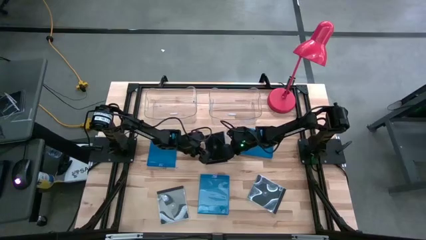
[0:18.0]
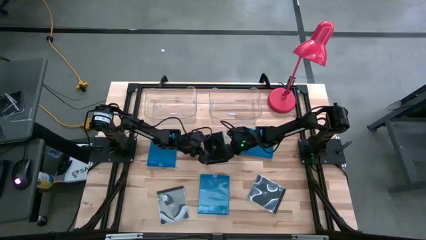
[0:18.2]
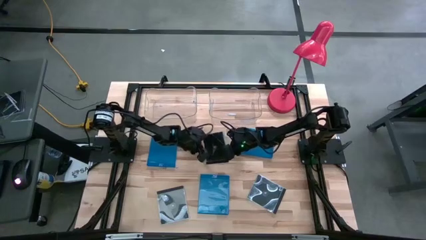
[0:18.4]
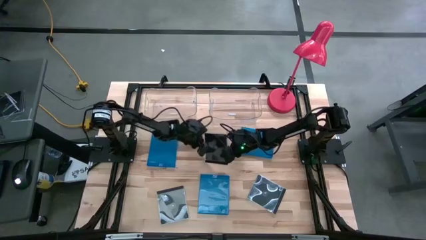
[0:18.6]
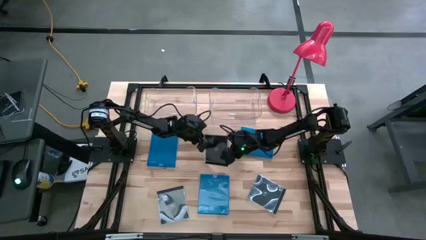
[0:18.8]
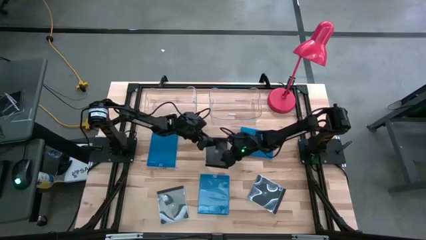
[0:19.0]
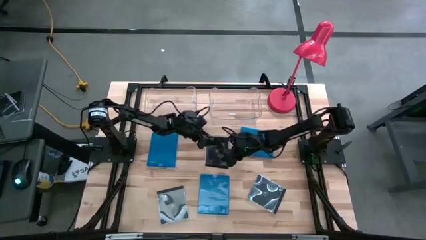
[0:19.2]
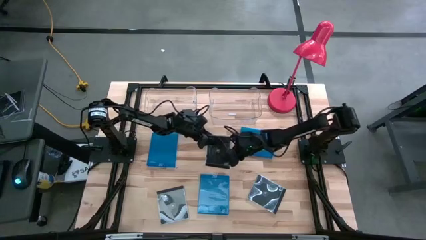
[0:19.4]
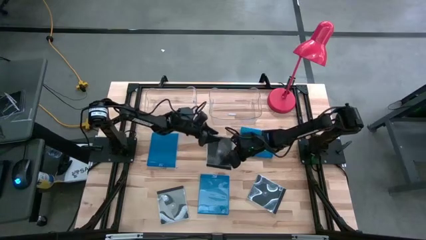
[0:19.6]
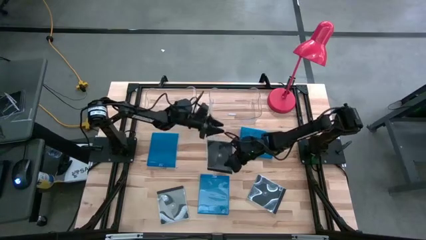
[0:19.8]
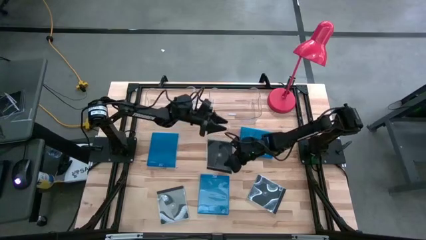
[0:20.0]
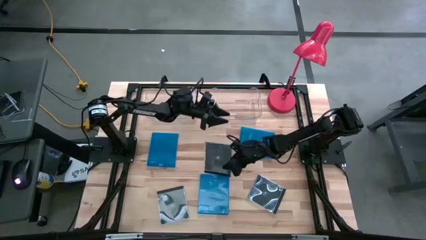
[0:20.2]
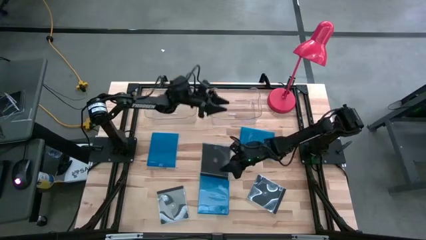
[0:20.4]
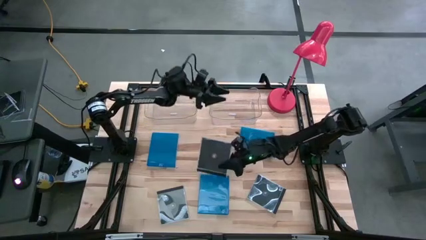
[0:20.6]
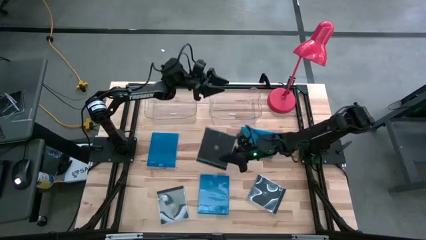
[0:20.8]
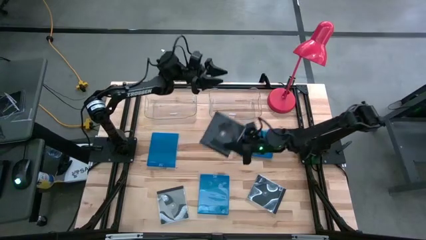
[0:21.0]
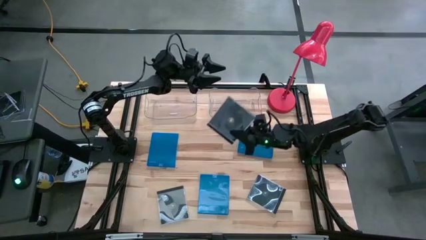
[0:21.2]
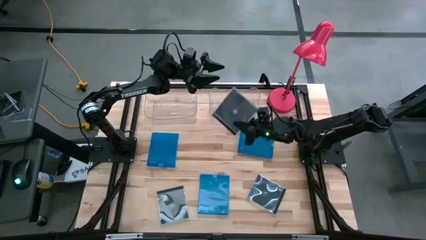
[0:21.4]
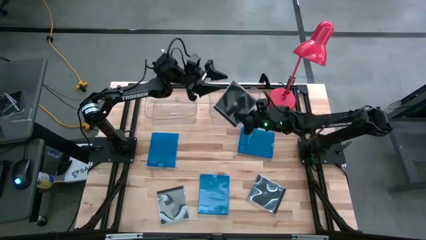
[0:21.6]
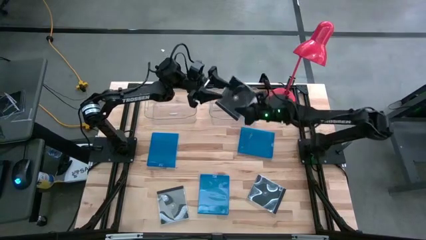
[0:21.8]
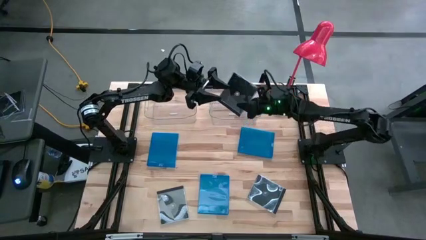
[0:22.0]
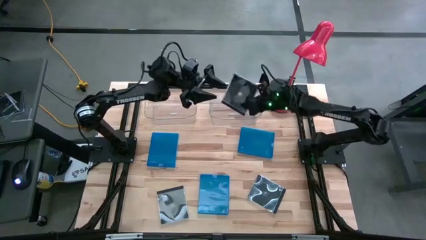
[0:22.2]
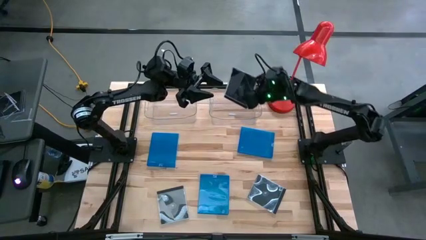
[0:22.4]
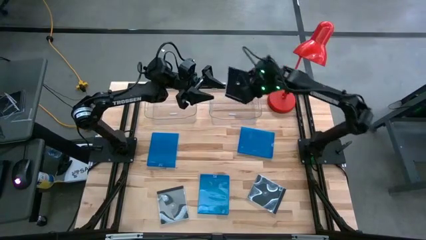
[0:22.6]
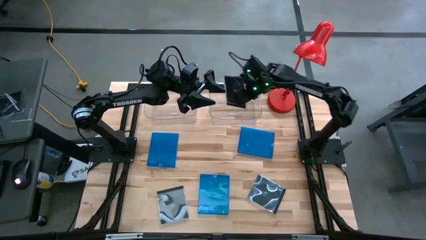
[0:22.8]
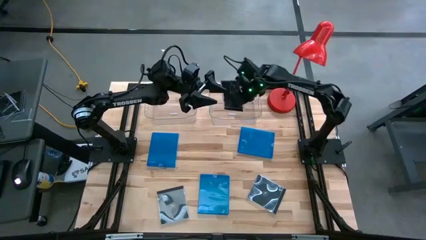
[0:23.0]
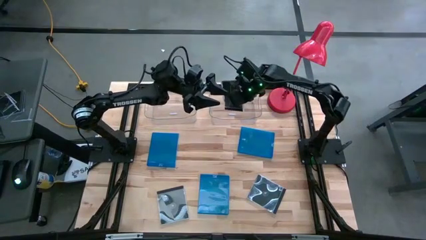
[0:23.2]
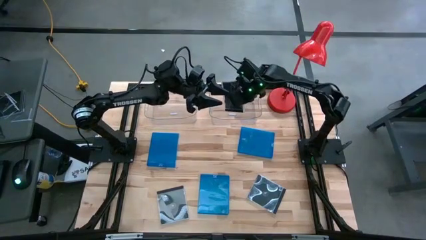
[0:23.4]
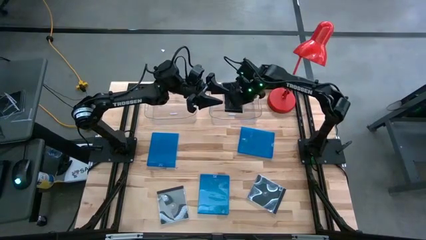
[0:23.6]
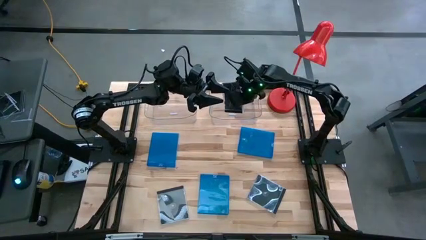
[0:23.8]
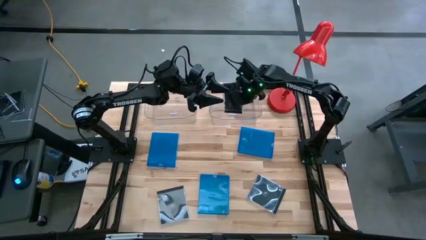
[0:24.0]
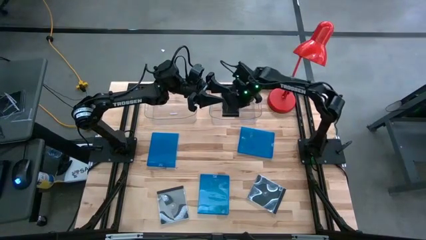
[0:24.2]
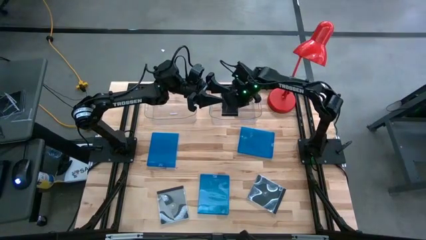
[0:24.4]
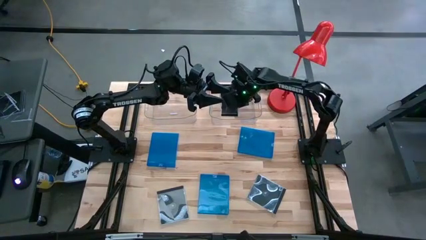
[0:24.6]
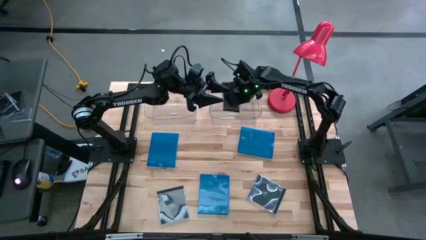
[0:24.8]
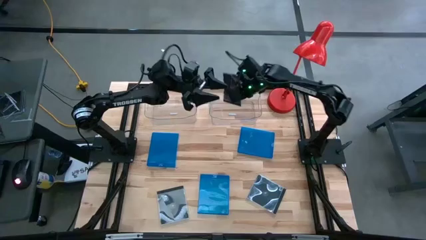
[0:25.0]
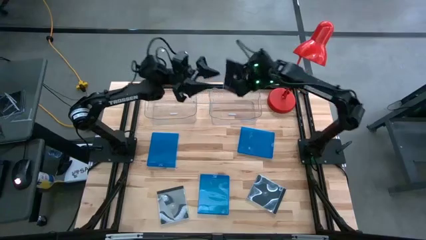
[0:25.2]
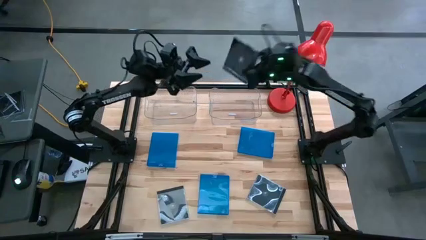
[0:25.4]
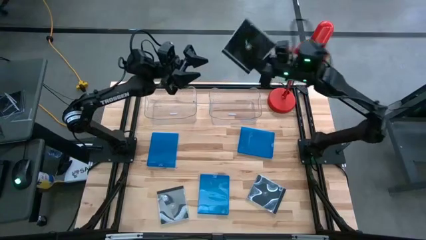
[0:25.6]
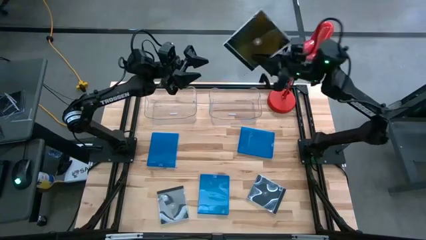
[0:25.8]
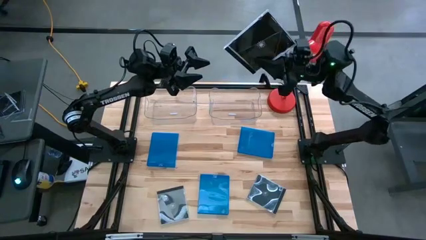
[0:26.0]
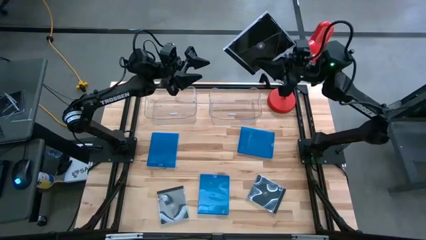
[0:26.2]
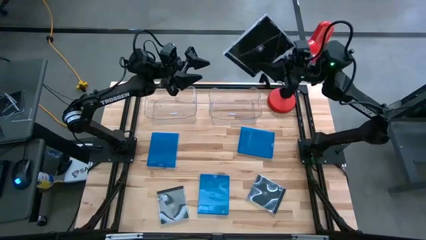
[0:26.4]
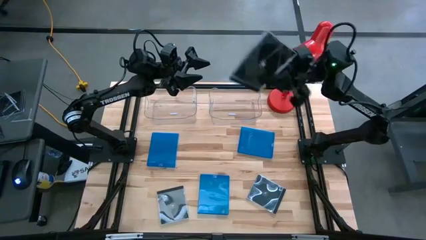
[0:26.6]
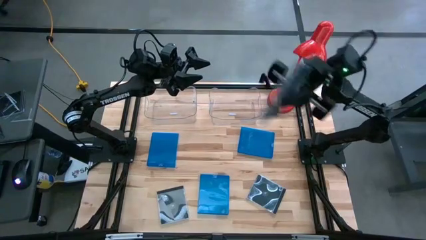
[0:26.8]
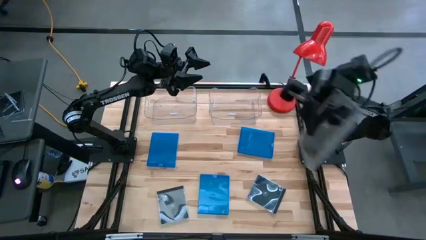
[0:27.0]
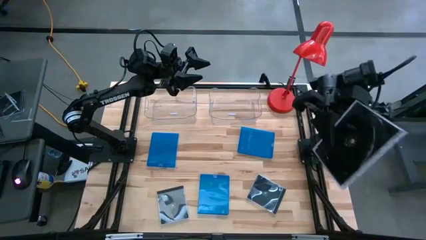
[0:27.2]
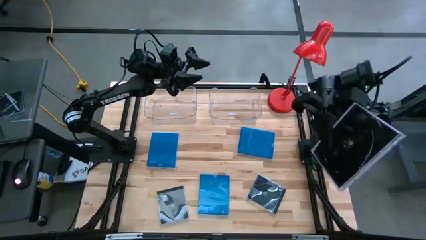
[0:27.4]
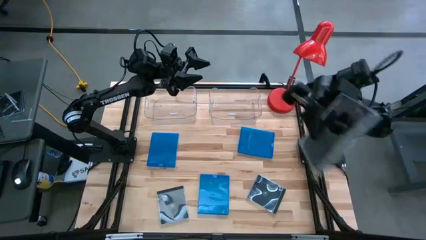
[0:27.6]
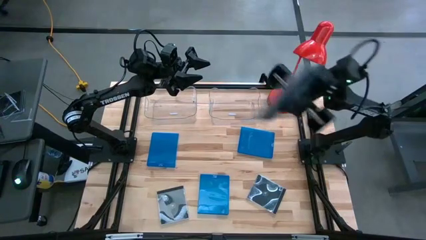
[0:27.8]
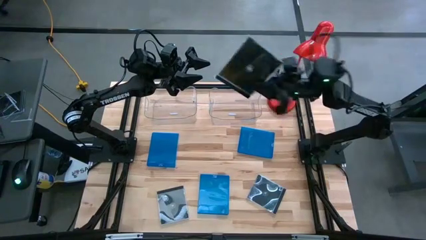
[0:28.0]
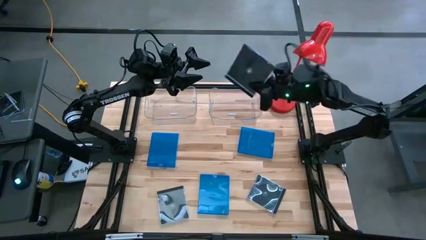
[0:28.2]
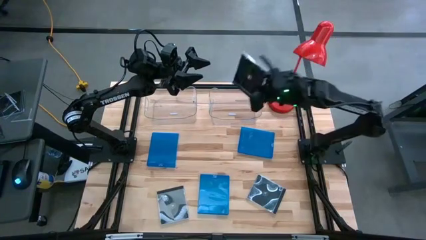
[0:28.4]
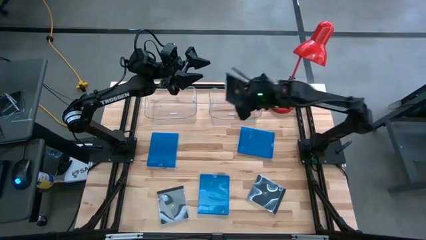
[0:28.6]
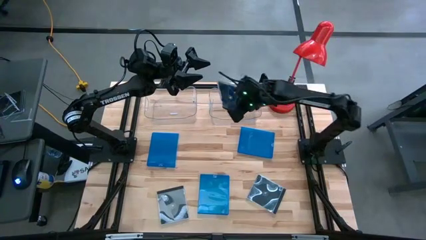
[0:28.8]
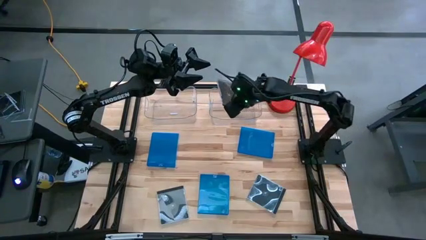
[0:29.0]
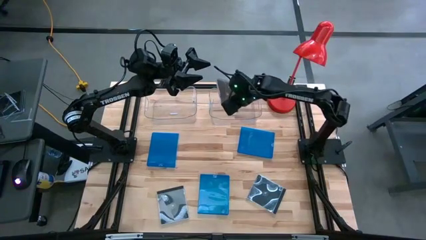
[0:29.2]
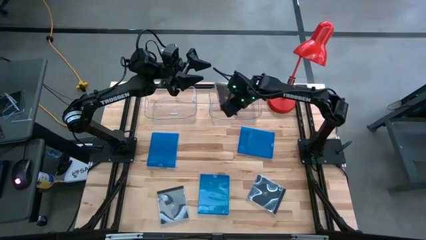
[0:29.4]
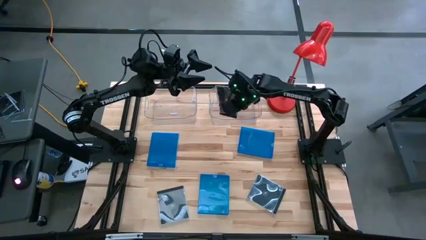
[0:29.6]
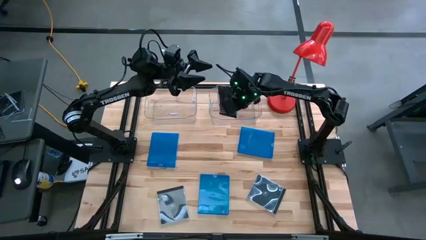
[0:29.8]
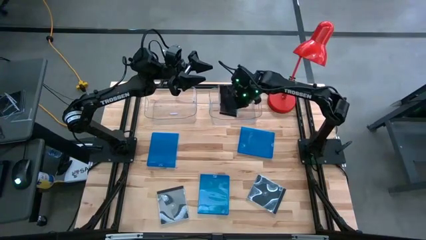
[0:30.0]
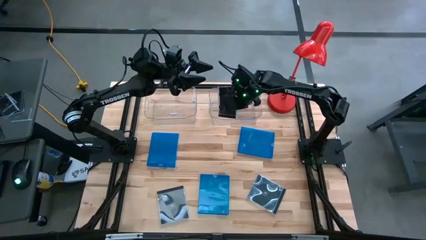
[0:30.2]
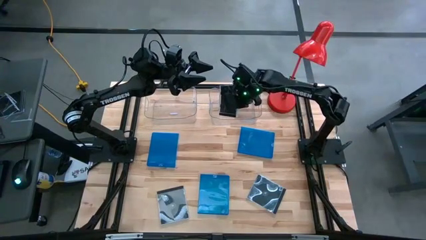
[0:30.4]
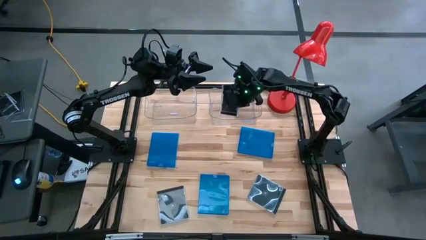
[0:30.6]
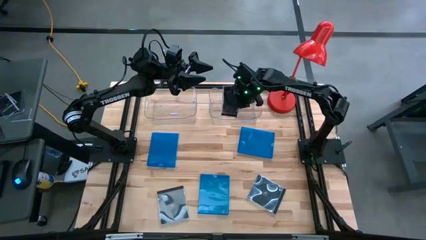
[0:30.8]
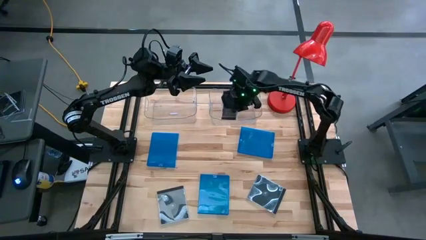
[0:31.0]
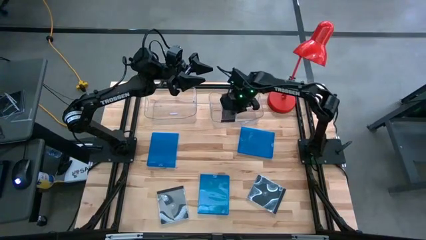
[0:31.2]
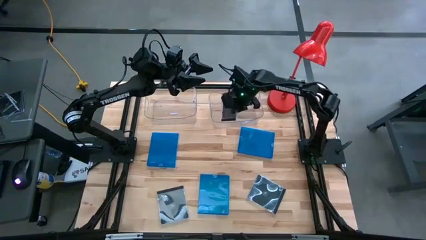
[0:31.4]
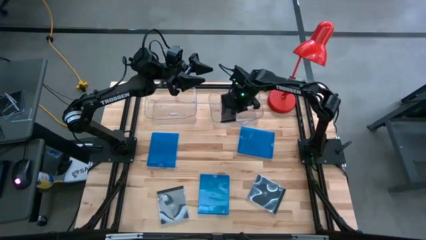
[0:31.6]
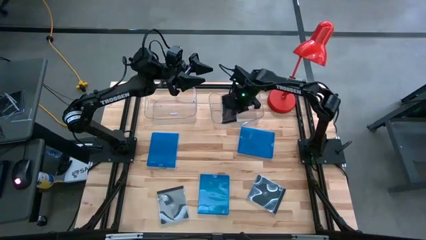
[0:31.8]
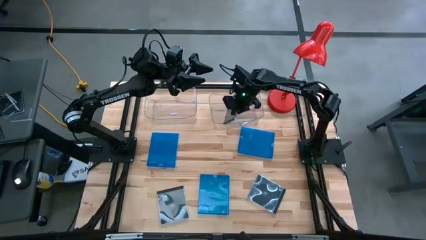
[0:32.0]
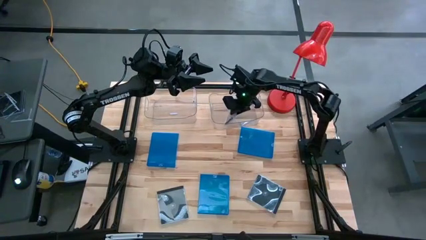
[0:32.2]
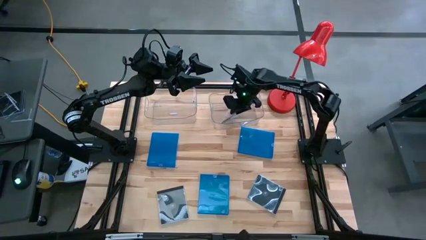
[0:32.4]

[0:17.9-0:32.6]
Task: Pick & place jewel cases by type
Put the top black CD case into the right transparent bin

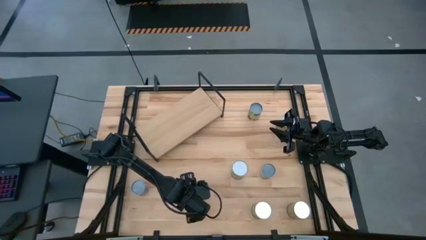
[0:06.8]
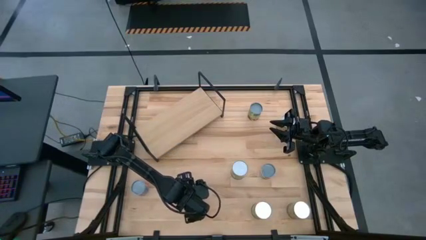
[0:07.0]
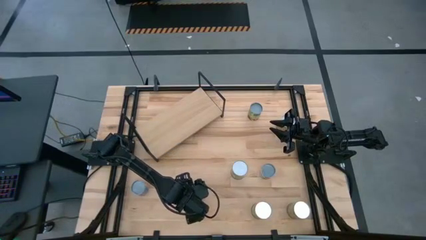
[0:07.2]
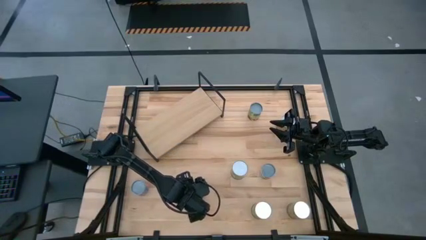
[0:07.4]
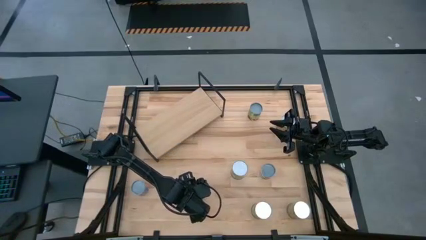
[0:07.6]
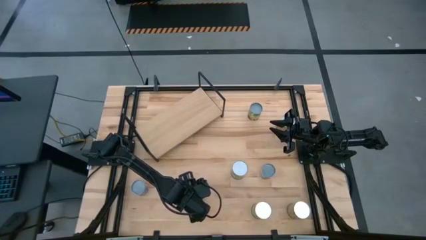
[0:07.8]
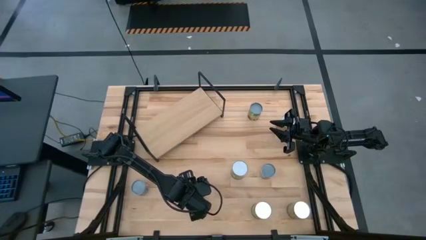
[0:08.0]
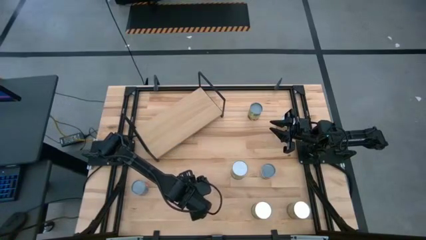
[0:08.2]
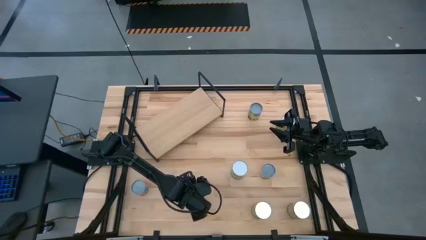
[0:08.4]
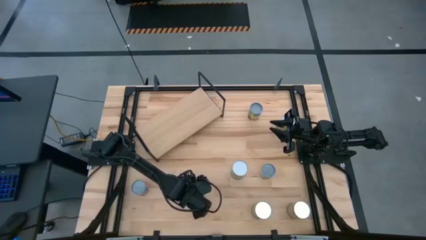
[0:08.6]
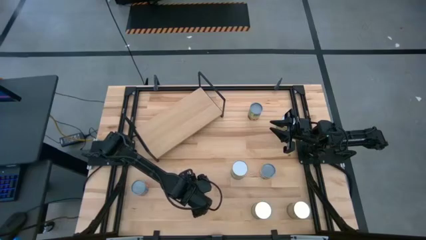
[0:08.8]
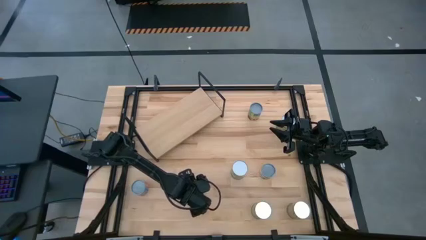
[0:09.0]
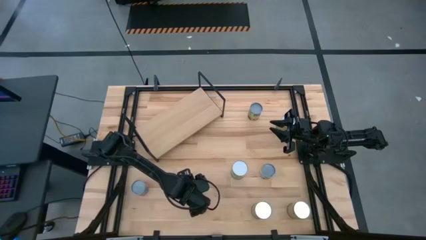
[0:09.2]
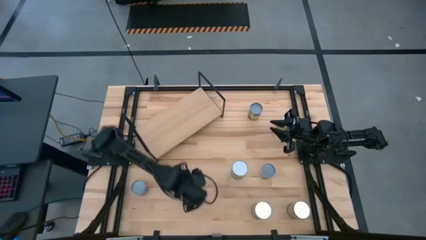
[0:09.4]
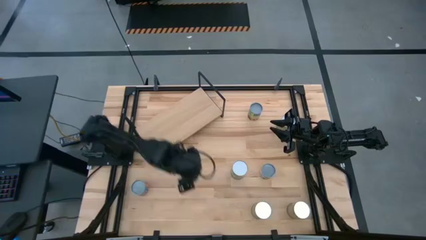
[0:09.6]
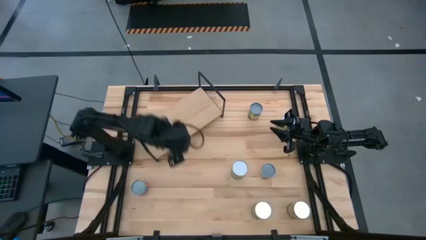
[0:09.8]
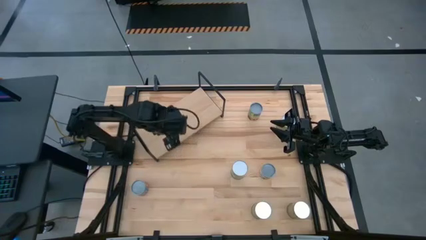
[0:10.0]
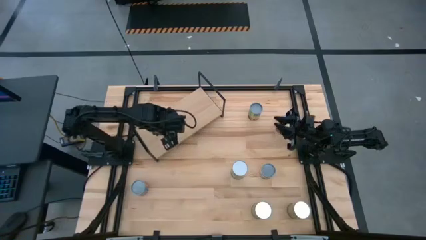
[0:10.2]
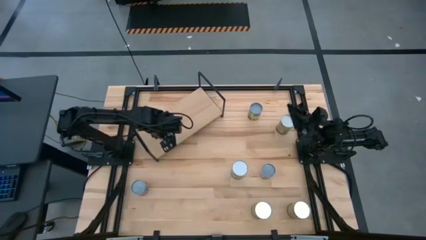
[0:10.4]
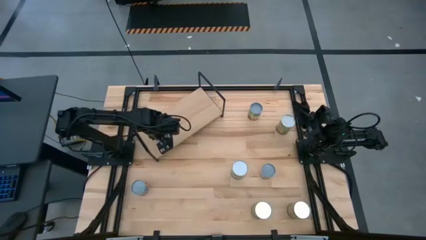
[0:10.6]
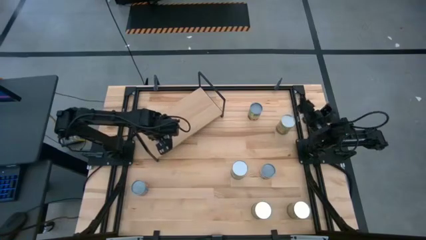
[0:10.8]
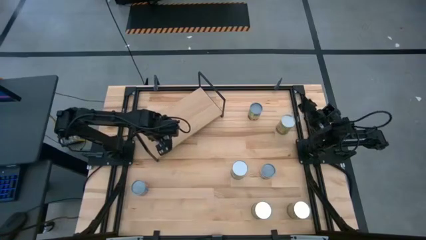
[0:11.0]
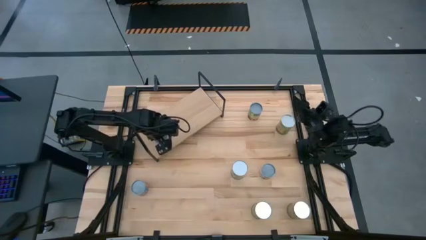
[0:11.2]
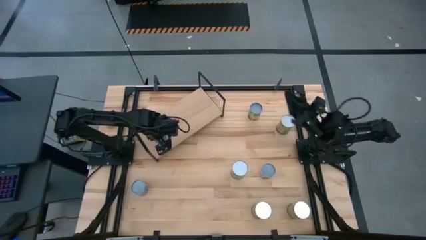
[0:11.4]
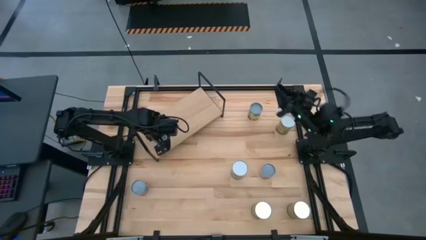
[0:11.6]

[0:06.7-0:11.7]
Task: Pick and place cans onto a shelf
Put the canned mixed fruit on the shelf
